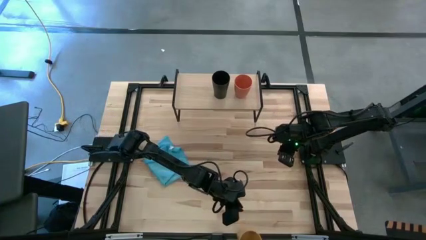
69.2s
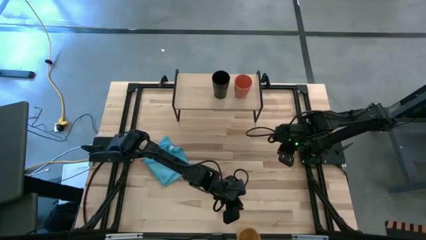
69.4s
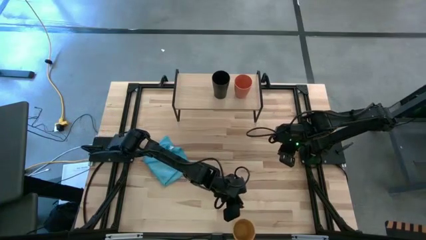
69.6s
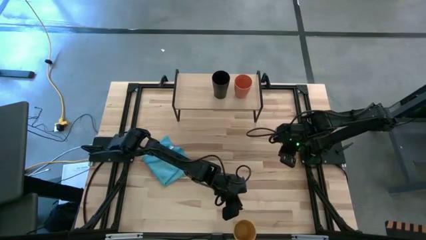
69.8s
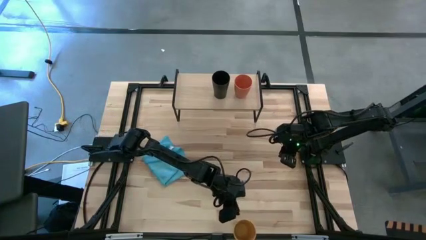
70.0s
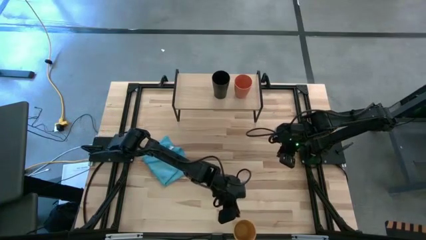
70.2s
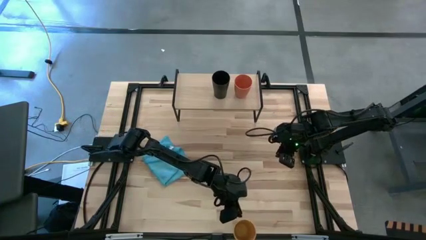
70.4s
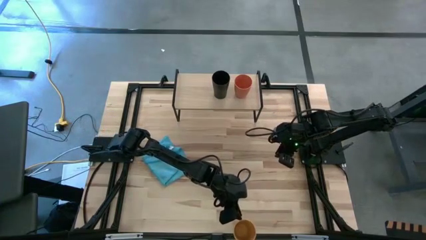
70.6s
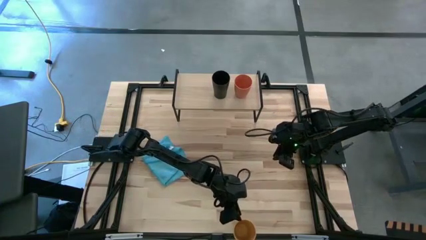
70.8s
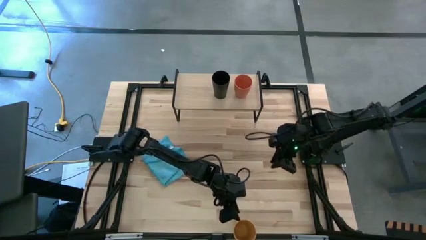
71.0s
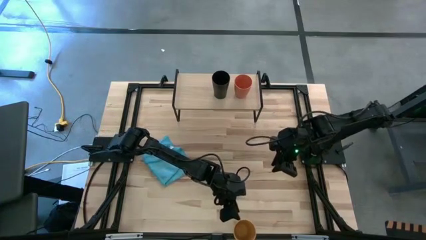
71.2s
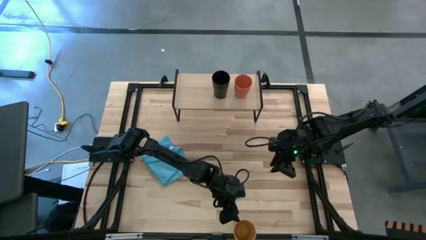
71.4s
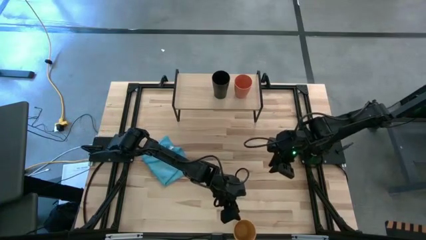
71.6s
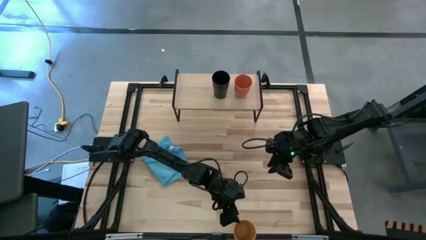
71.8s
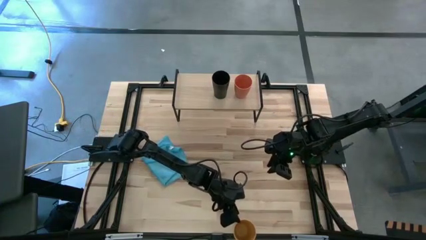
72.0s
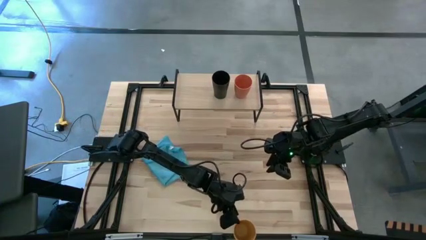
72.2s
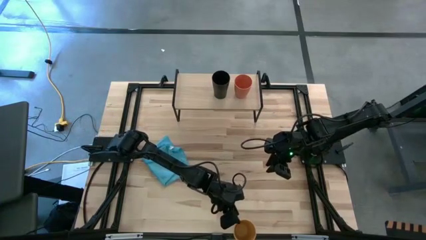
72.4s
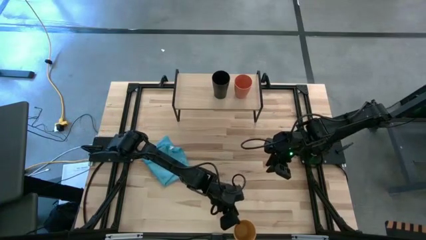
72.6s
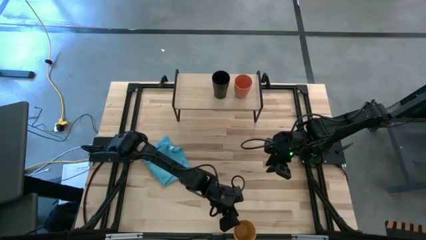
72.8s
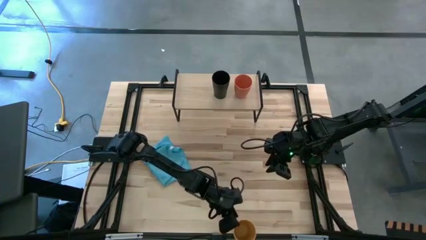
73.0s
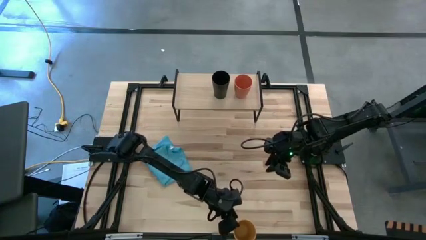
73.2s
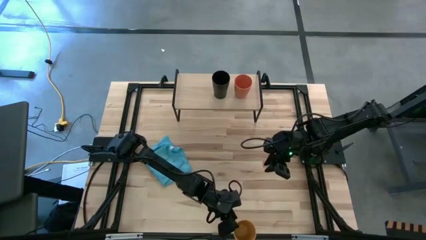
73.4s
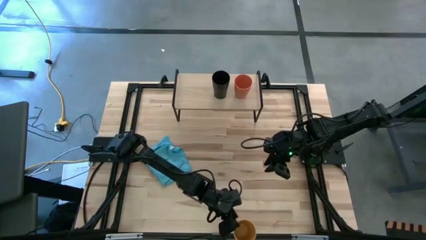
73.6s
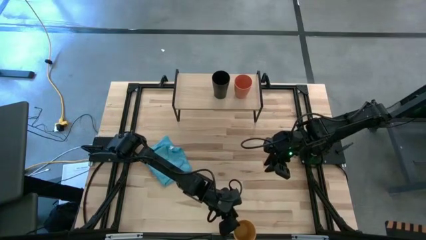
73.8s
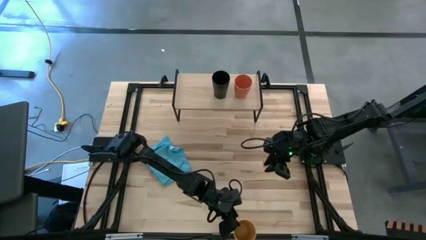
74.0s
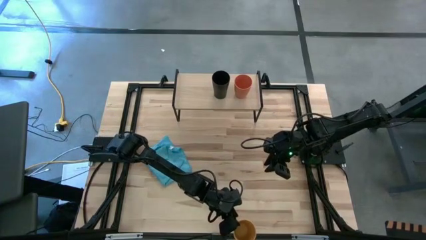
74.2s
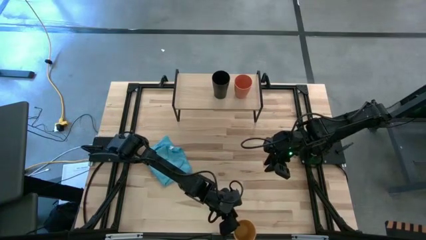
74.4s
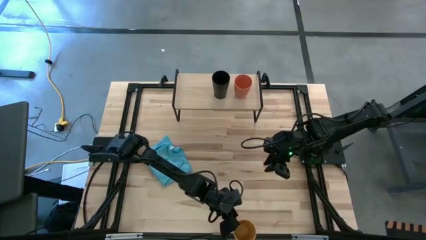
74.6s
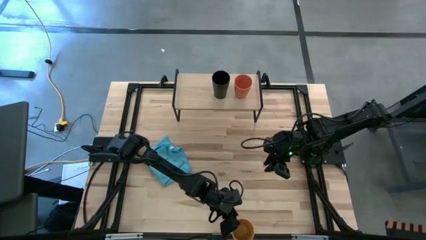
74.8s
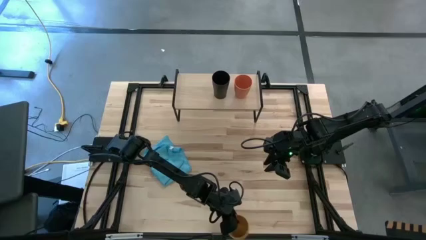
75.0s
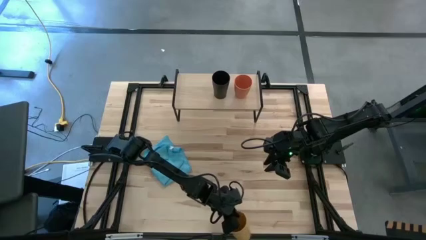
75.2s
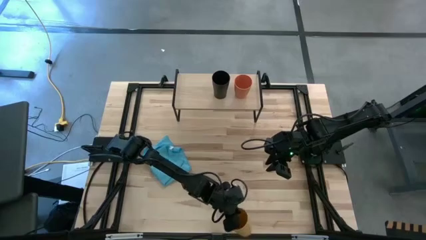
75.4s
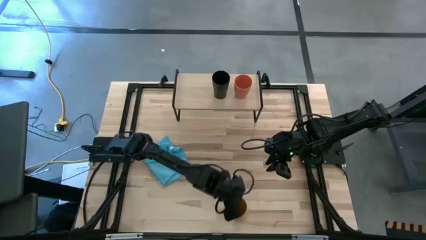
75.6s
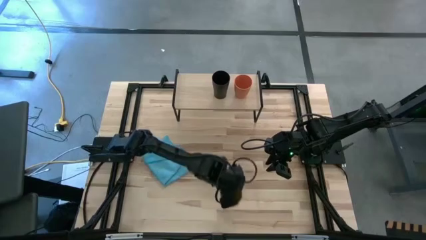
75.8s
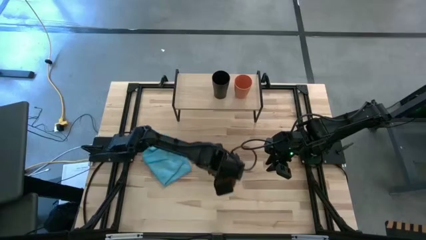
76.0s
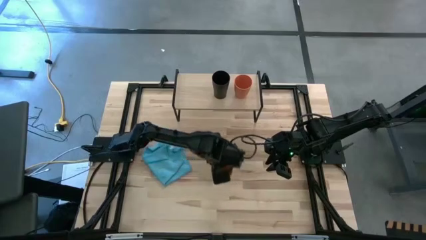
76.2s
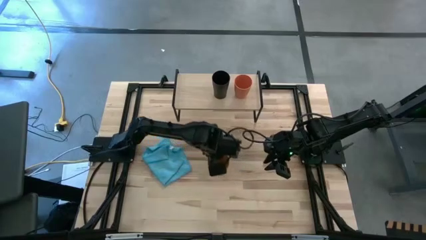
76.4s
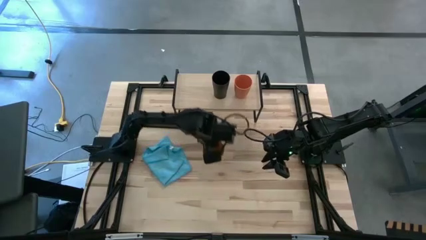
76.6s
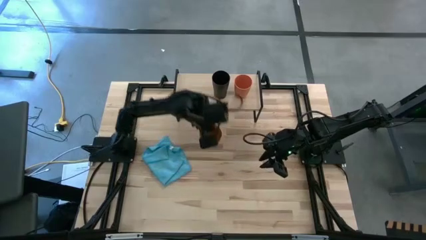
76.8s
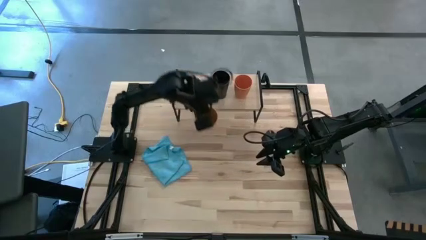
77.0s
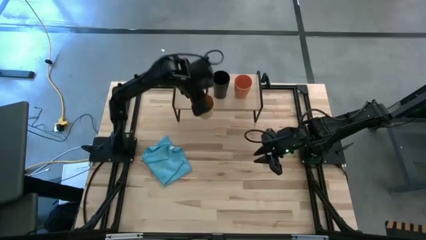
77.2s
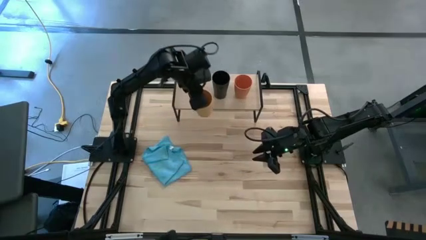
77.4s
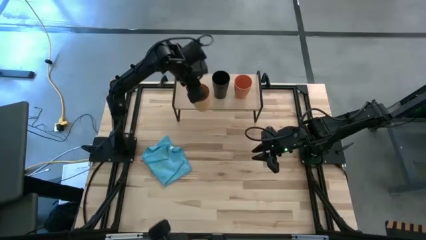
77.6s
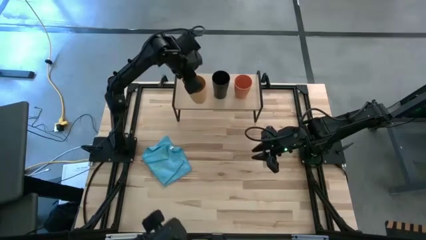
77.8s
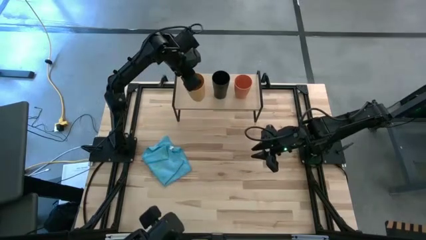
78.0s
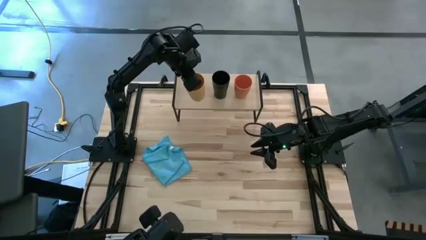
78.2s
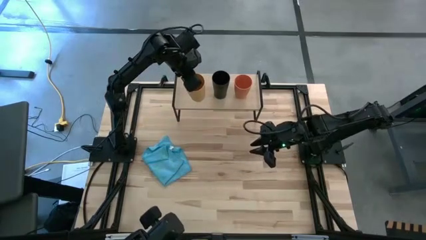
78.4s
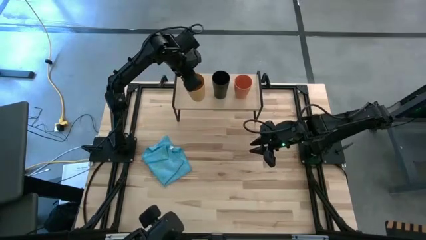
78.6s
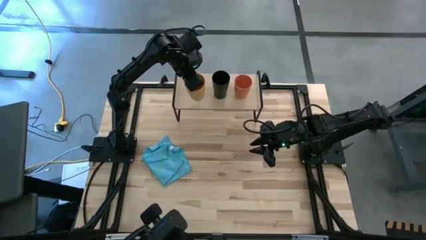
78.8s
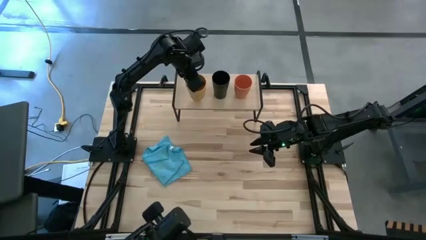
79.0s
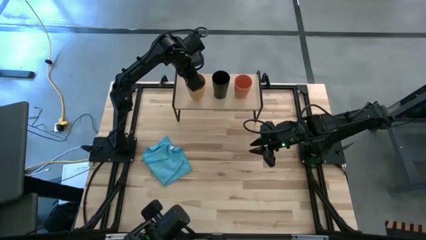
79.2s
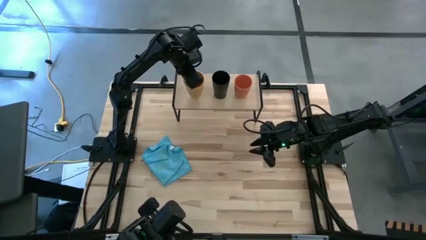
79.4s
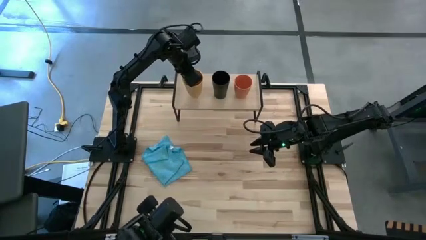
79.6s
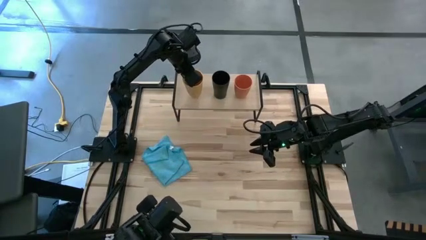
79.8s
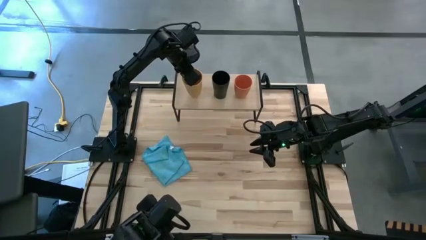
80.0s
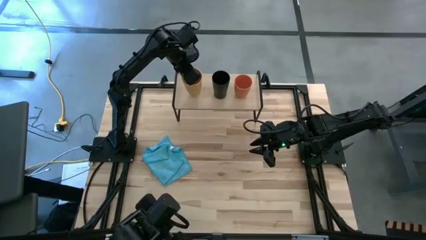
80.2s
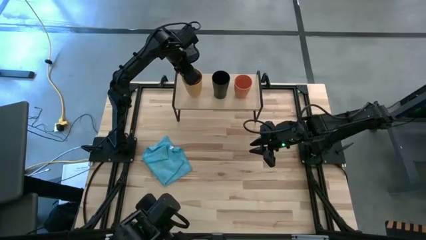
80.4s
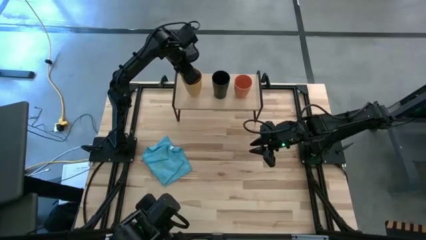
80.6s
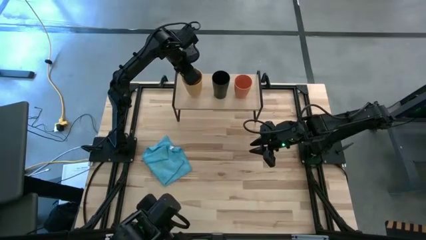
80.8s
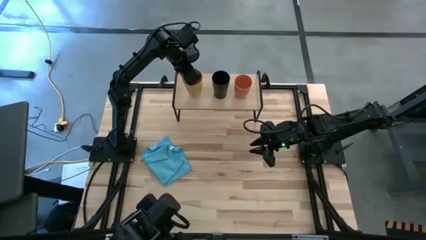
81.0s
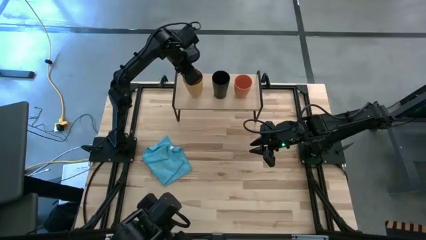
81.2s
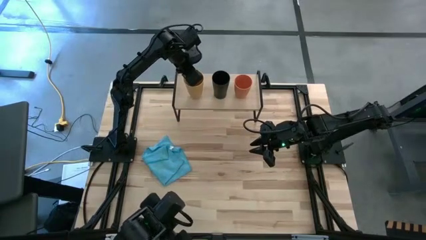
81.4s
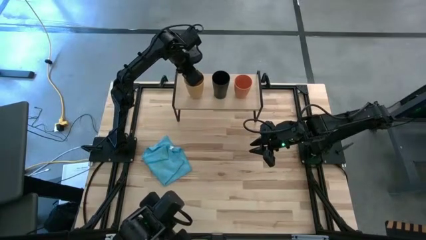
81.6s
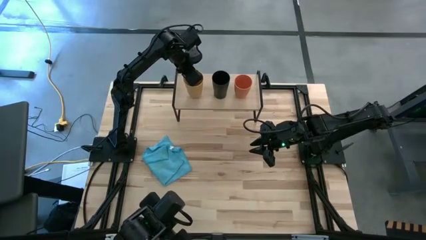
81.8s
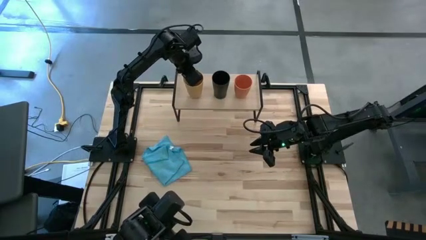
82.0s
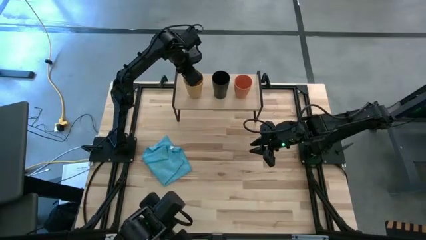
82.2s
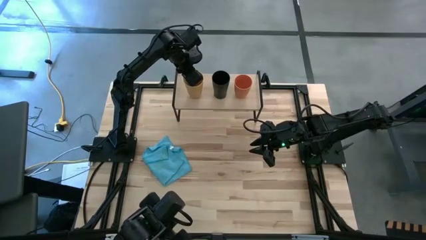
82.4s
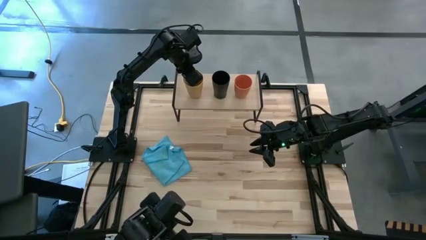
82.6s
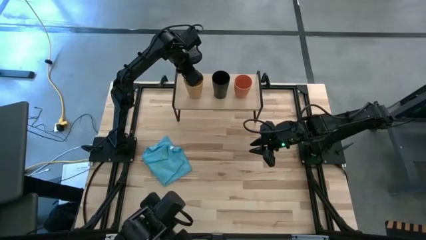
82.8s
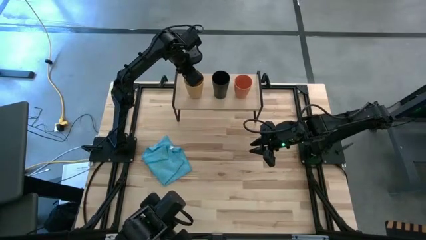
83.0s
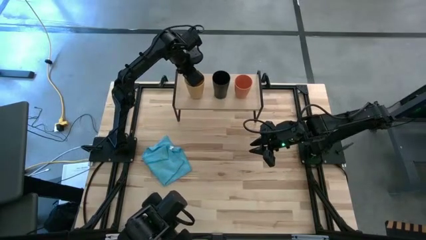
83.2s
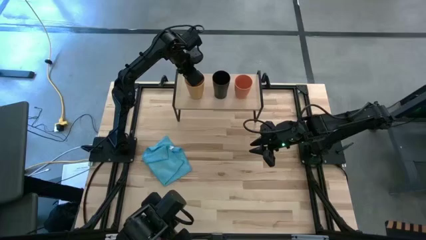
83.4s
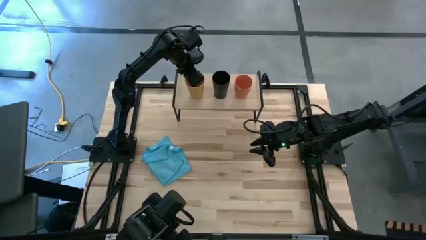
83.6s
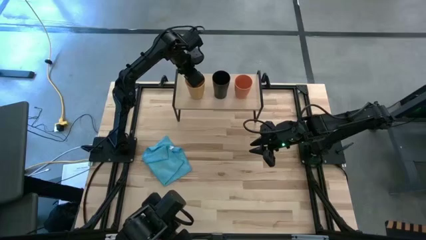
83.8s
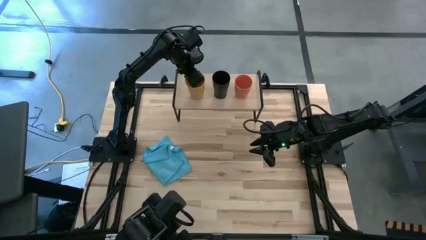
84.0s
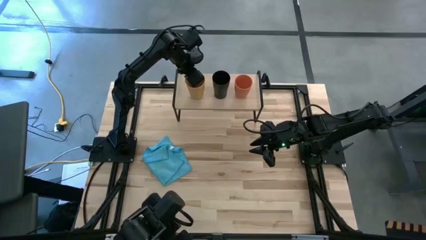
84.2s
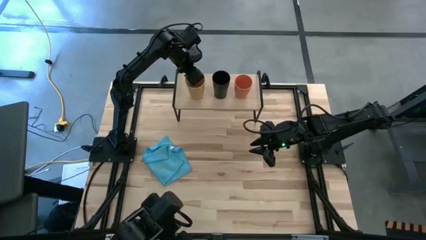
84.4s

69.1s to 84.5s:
Task: Stack small to large cups/mugs on shelf
Put the yellow cup on the shelf
